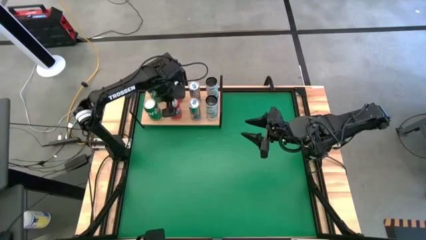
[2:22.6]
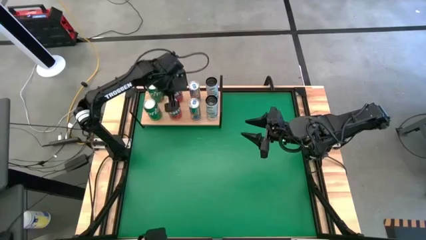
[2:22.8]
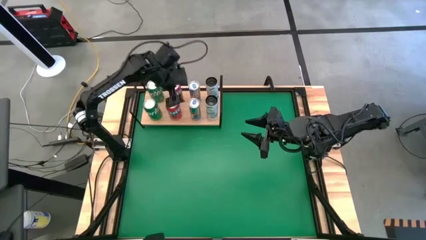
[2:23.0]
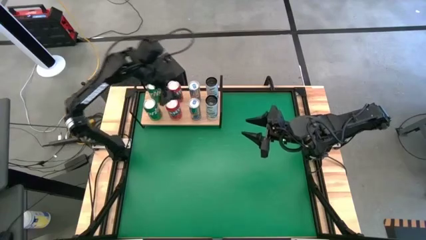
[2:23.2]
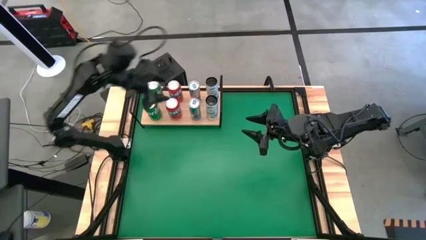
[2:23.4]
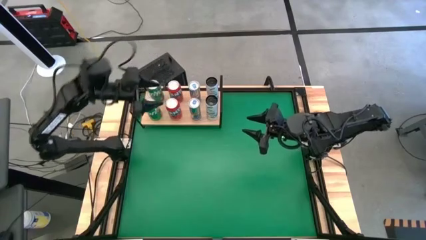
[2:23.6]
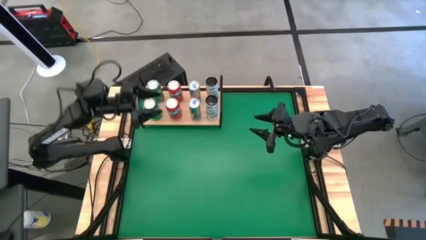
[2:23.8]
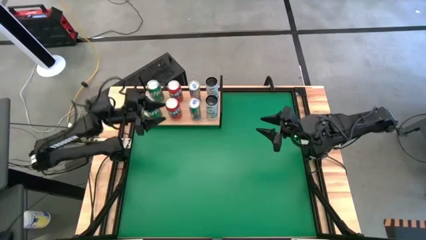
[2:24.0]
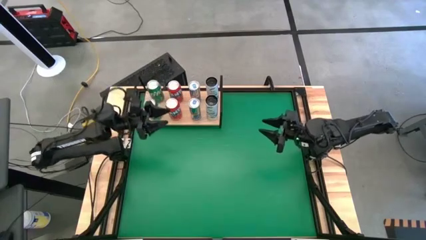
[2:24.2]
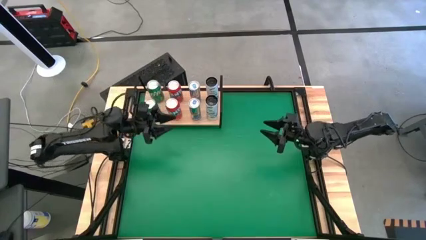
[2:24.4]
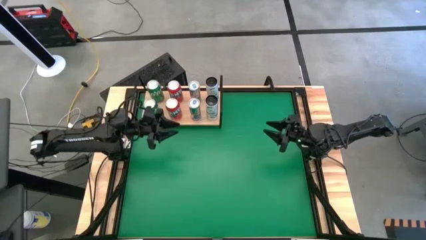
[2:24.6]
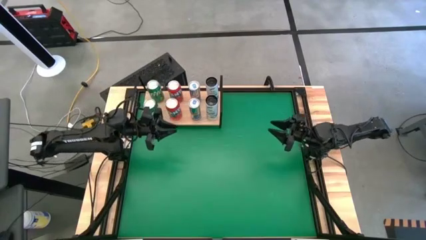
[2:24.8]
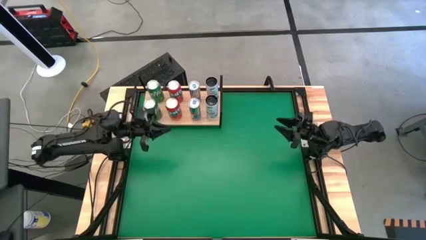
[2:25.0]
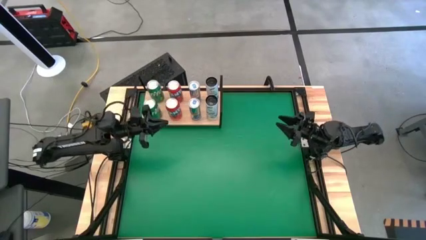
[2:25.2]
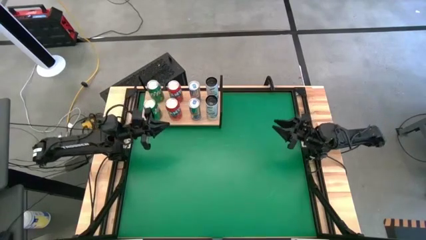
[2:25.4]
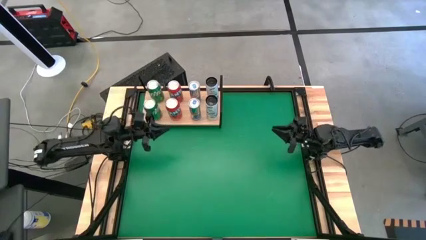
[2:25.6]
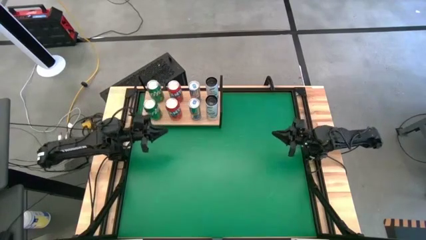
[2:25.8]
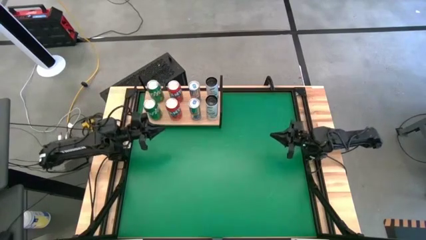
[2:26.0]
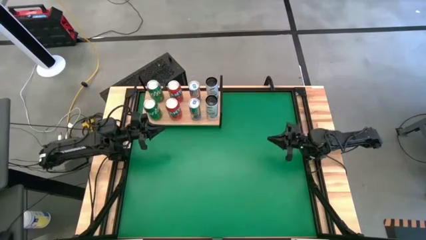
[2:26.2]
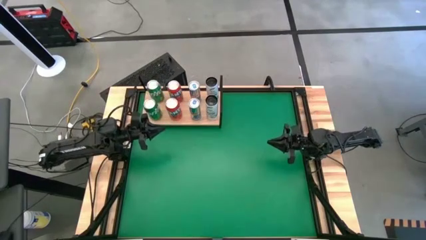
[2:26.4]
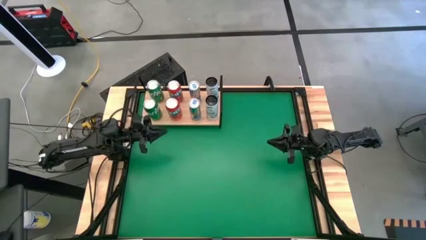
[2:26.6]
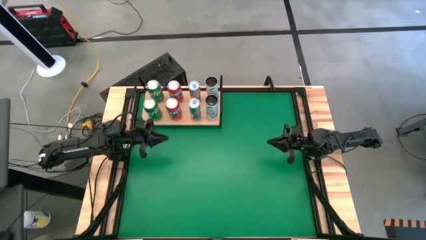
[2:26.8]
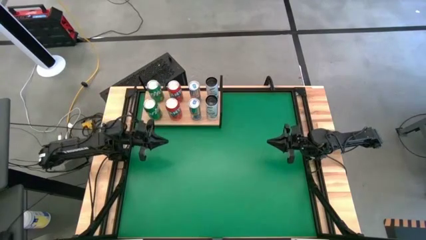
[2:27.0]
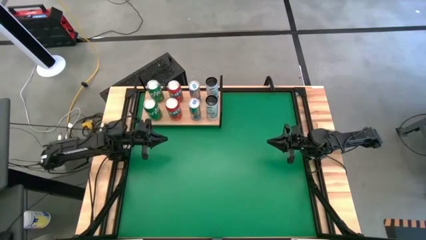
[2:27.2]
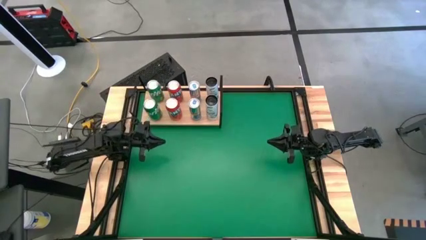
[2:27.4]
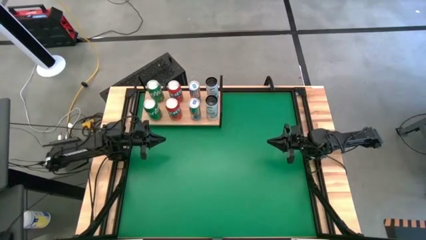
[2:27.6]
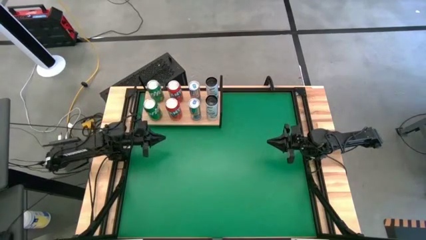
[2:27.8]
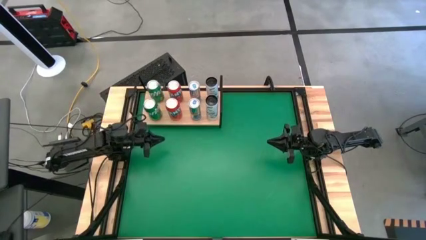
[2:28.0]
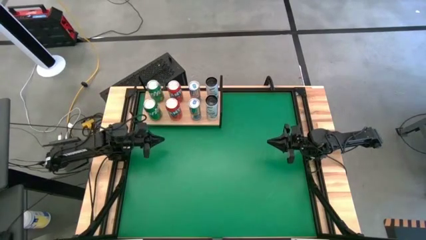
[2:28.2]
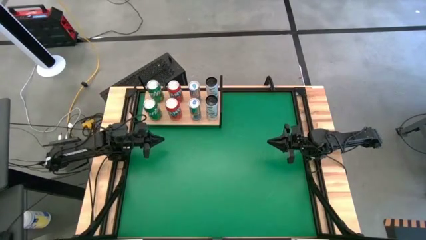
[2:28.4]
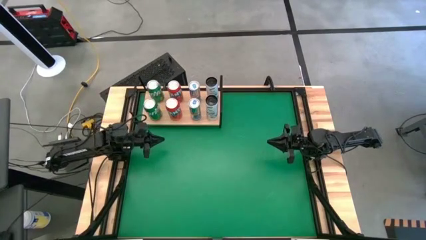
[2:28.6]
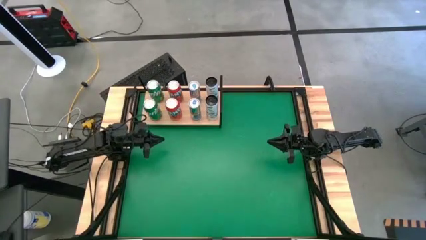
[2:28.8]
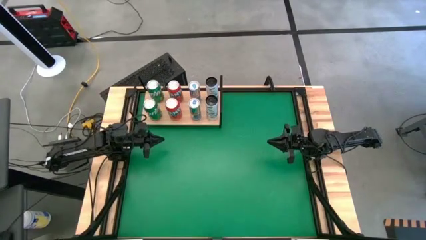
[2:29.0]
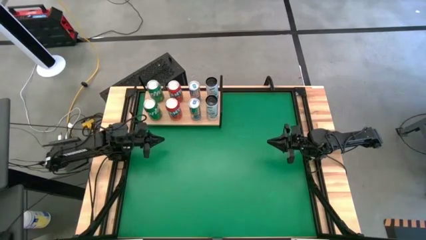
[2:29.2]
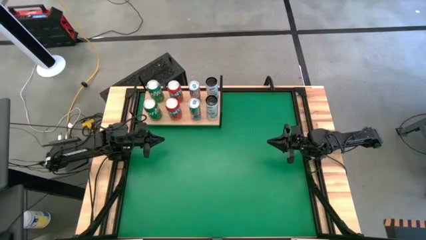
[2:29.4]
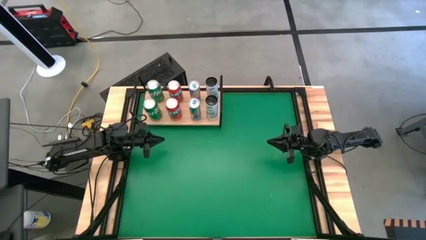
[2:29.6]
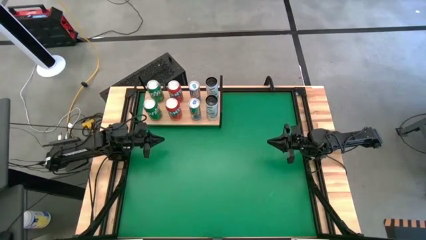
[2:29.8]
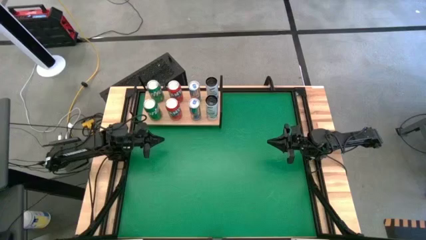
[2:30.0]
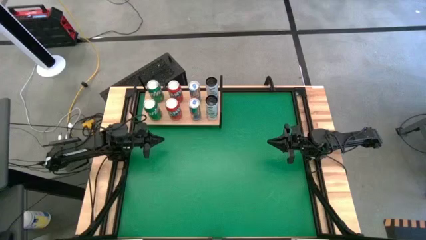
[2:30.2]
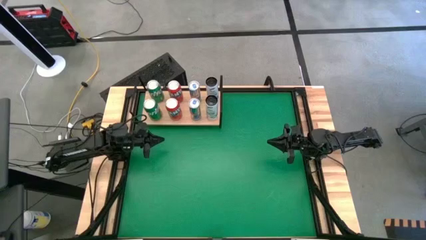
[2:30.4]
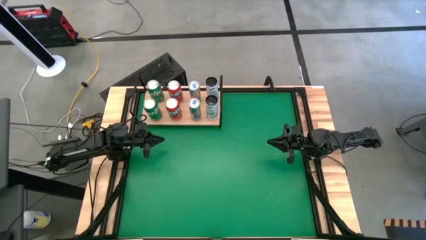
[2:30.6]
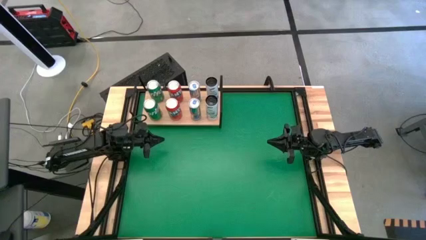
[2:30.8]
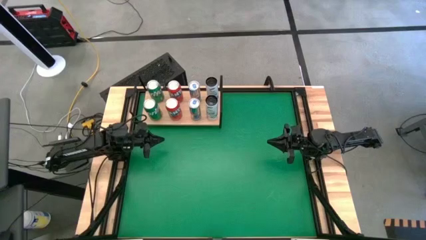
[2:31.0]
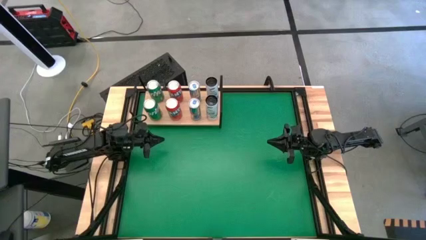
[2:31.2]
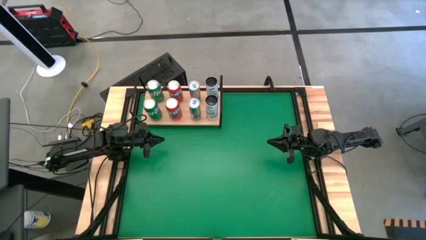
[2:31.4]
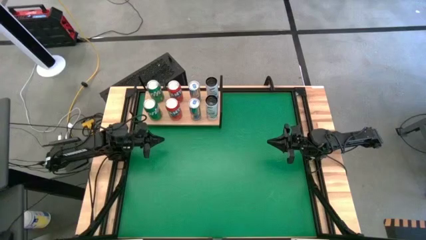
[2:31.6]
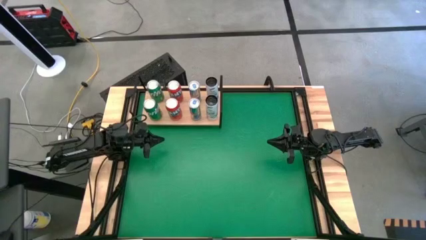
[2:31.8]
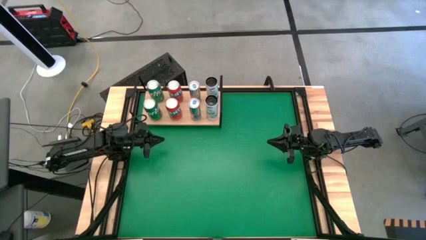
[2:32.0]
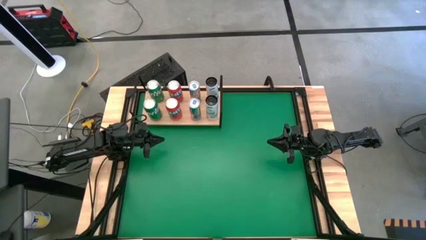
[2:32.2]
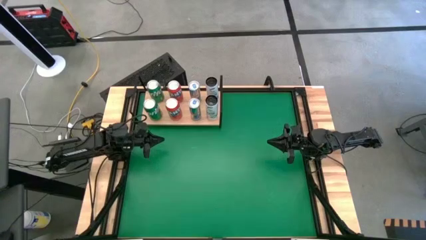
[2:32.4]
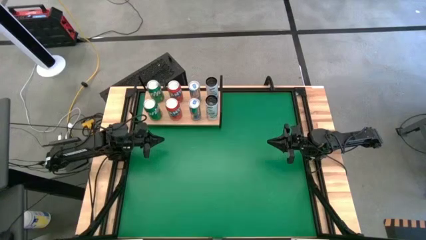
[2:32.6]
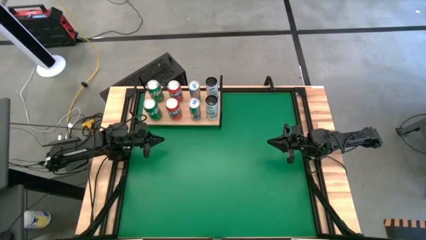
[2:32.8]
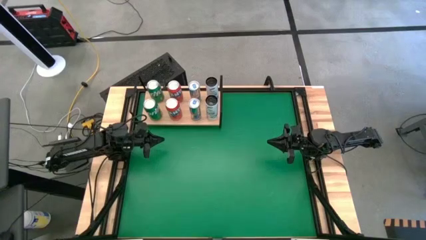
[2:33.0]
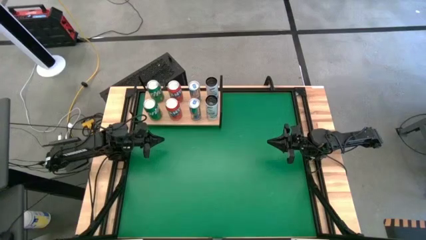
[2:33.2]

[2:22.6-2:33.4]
Task: Place canned beverage on shelf
Return to Home Position

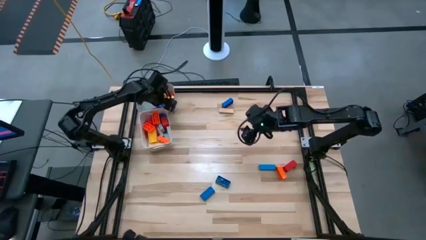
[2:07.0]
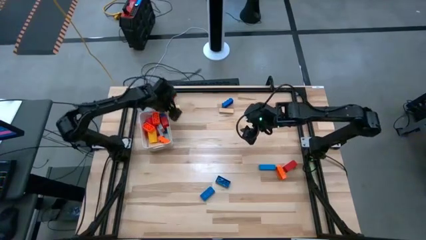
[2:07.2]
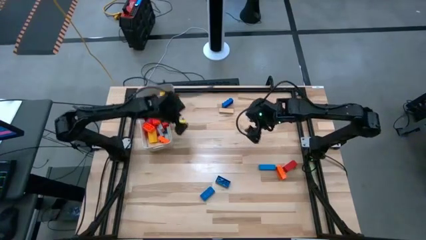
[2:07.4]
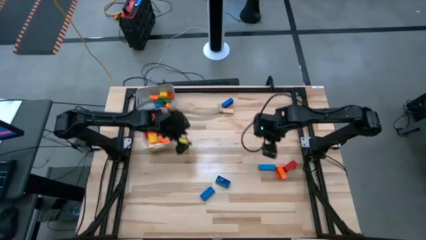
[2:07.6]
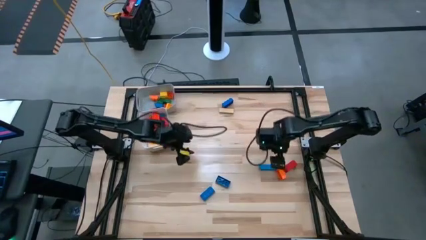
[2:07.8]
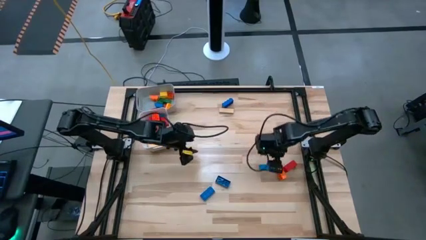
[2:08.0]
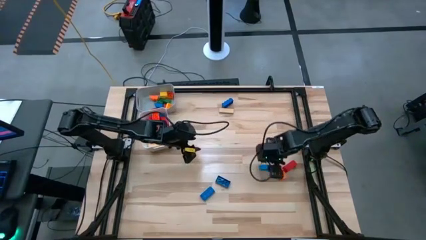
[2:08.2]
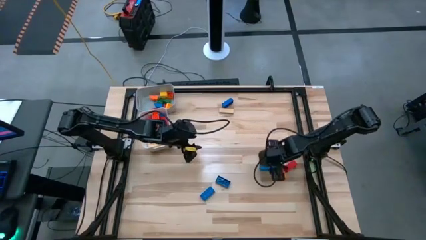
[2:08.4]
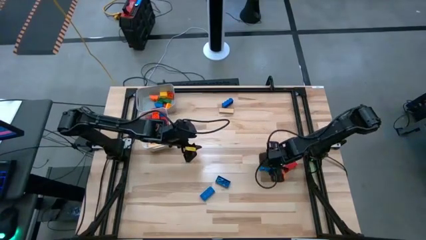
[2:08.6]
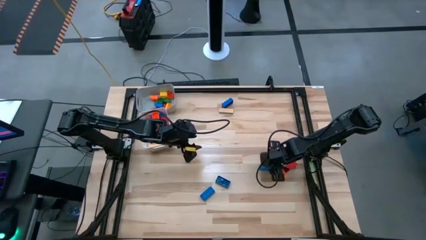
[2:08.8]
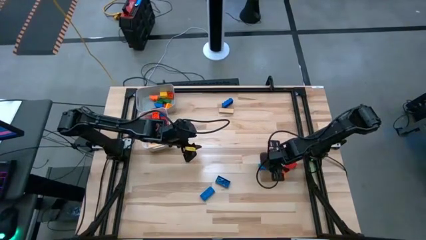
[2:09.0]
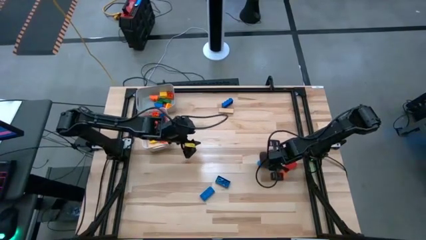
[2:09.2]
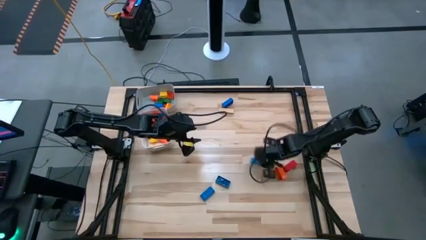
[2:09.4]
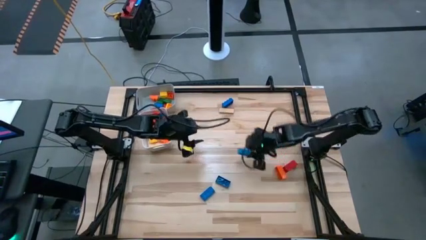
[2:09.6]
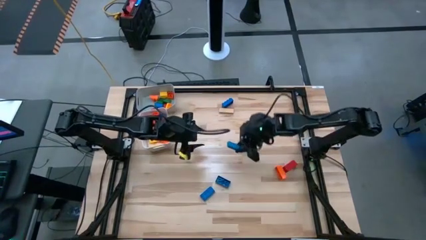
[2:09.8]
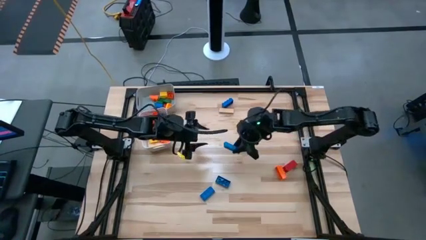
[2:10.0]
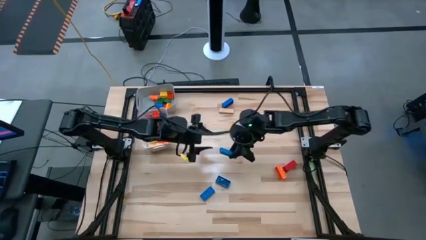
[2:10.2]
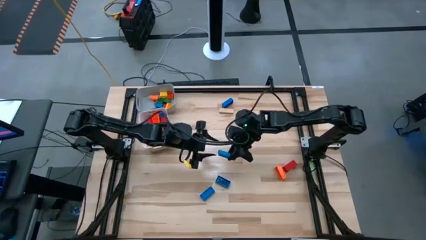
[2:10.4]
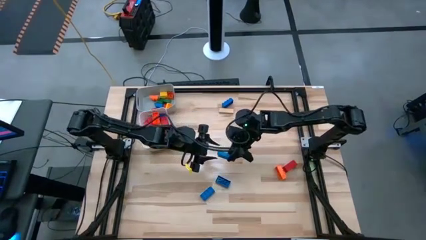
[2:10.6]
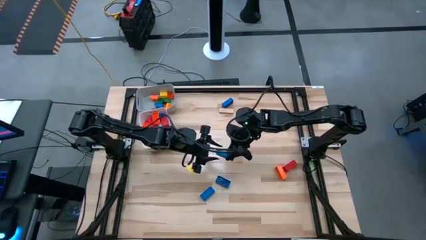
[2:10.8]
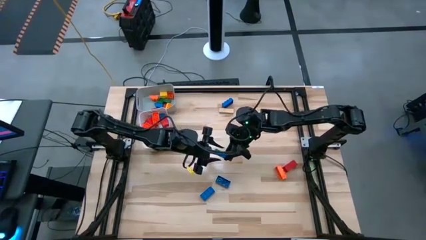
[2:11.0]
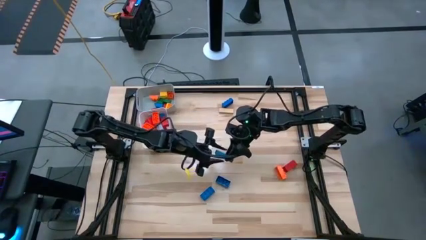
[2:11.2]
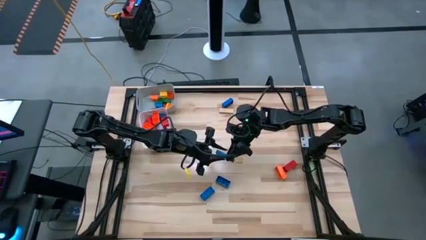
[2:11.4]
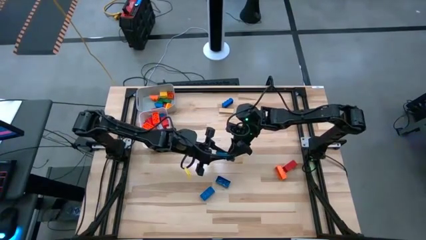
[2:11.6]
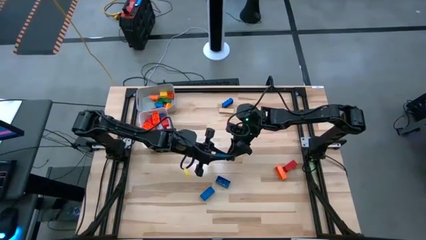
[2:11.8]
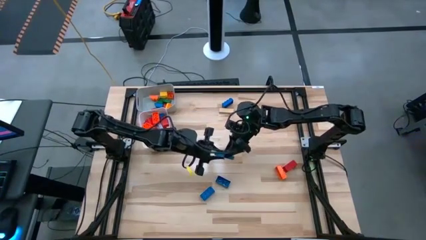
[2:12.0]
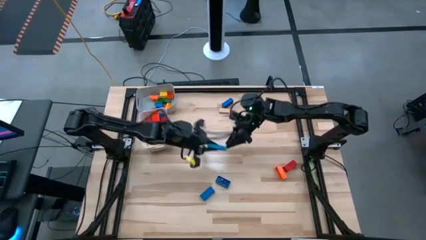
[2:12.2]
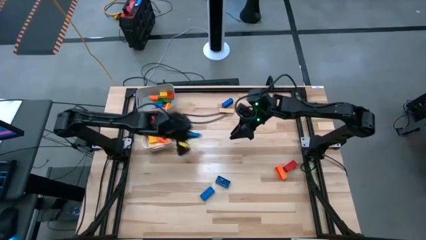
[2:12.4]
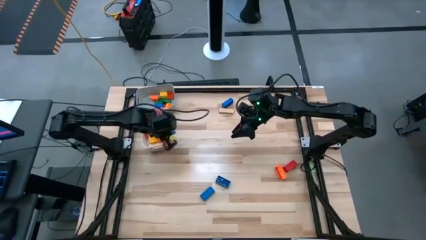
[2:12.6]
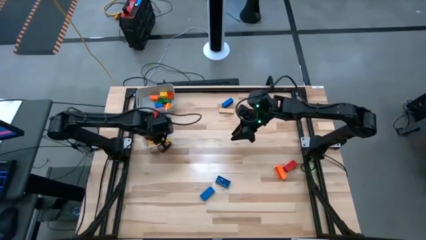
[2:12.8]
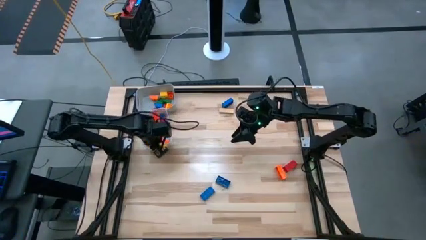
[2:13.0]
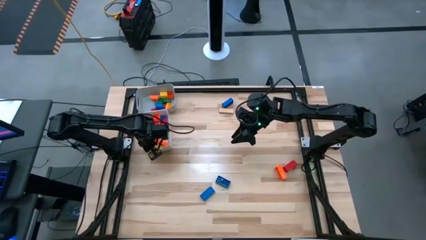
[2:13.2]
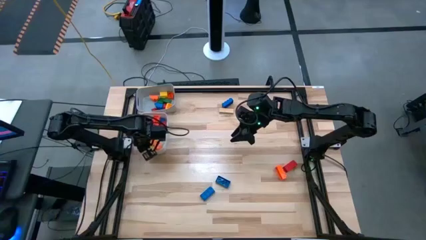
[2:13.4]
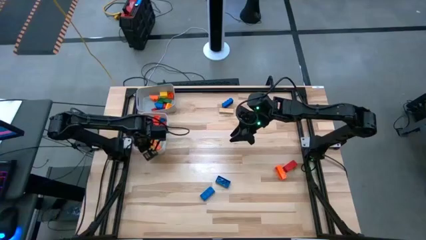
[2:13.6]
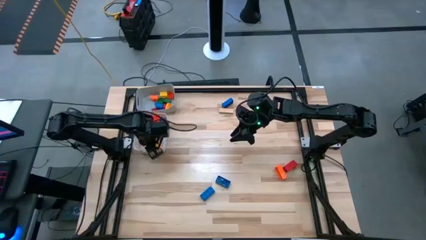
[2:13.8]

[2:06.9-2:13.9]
Task: Sort blocks by size
Put the large blue wooden block into the white bin
